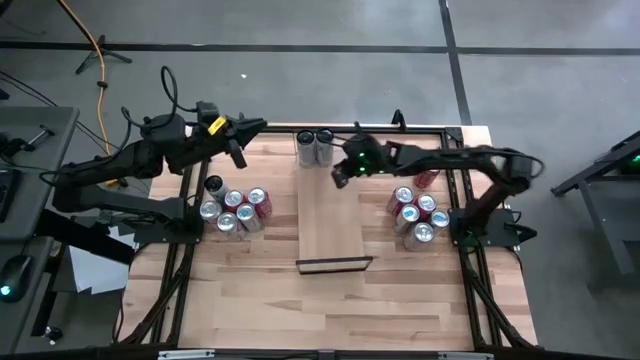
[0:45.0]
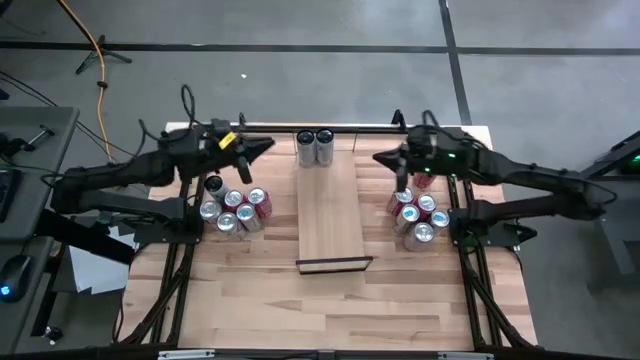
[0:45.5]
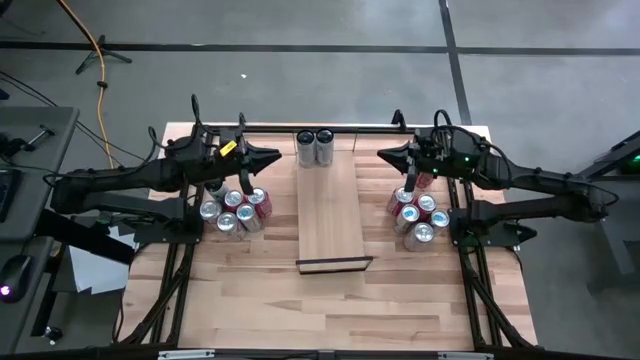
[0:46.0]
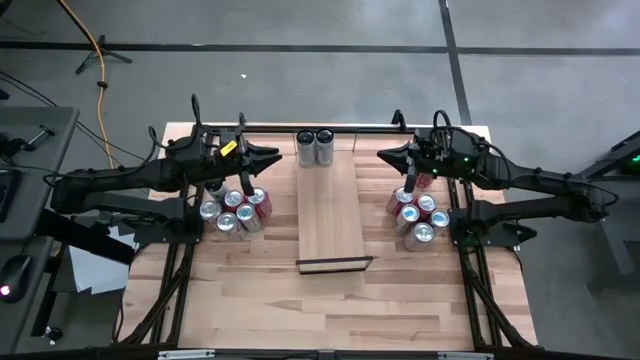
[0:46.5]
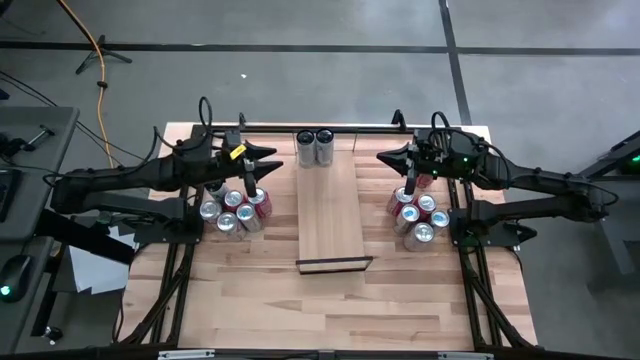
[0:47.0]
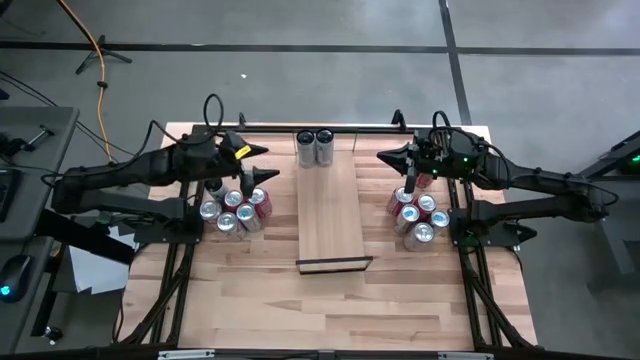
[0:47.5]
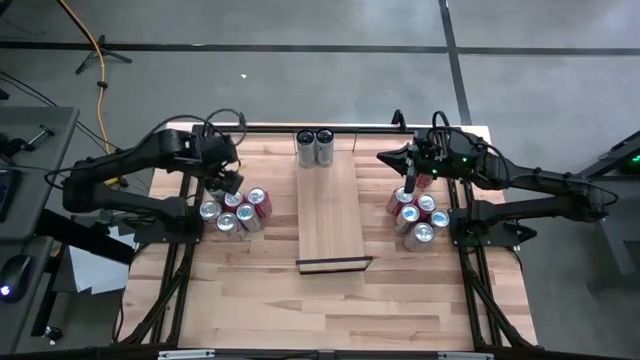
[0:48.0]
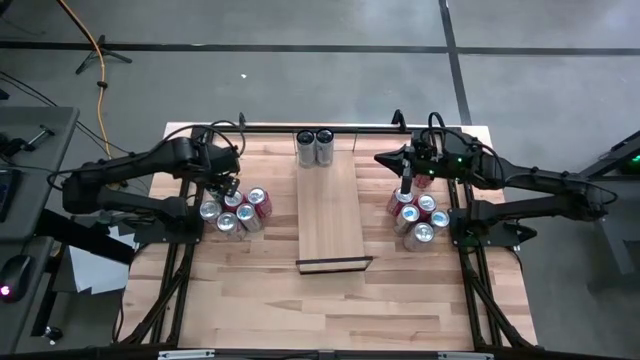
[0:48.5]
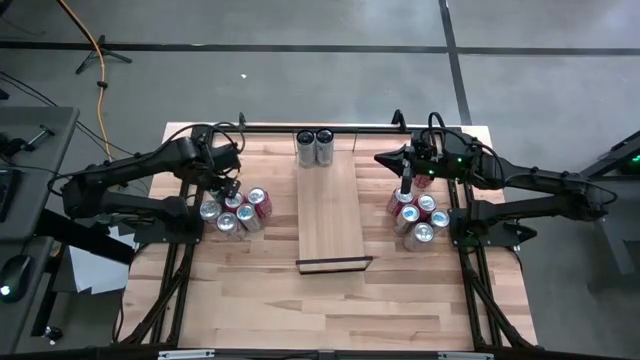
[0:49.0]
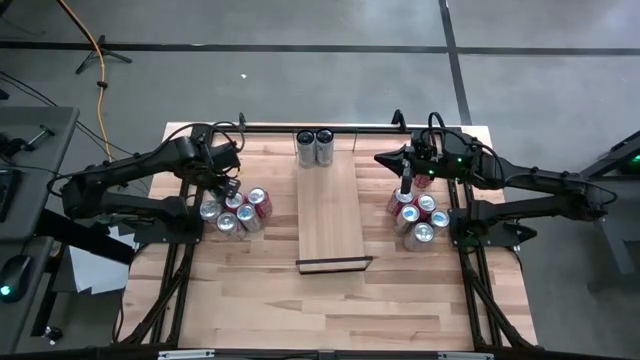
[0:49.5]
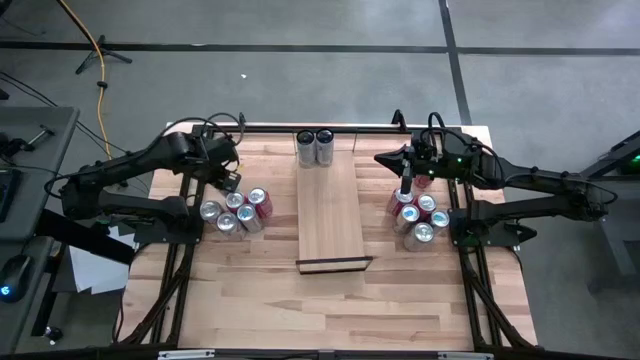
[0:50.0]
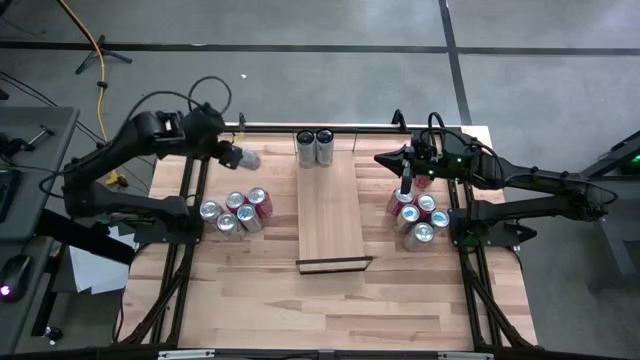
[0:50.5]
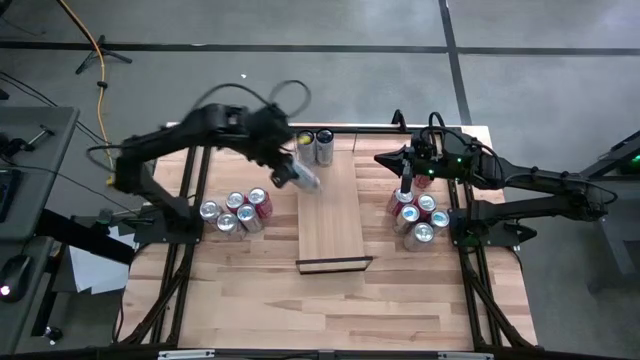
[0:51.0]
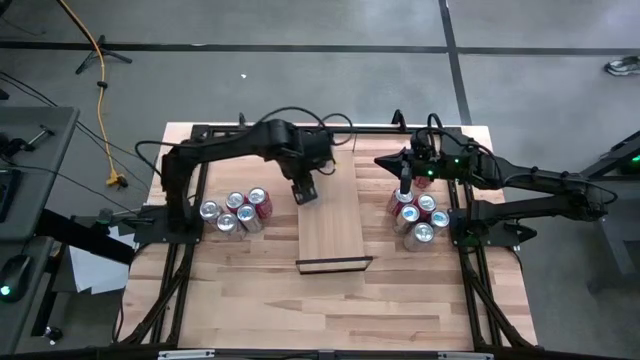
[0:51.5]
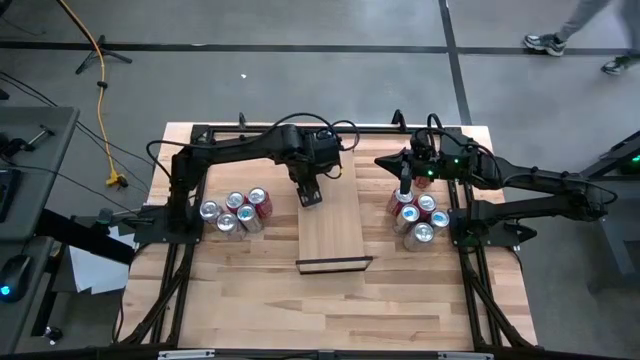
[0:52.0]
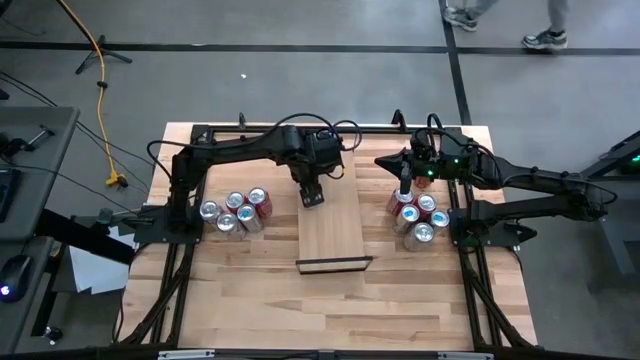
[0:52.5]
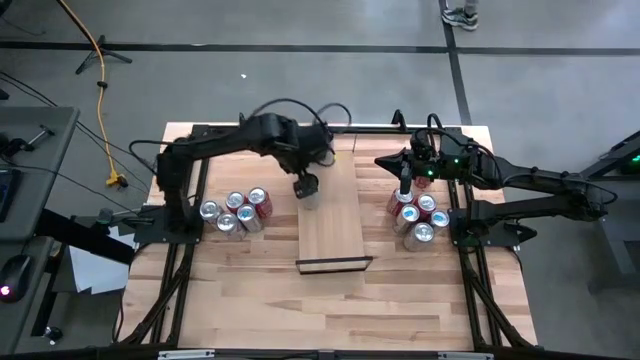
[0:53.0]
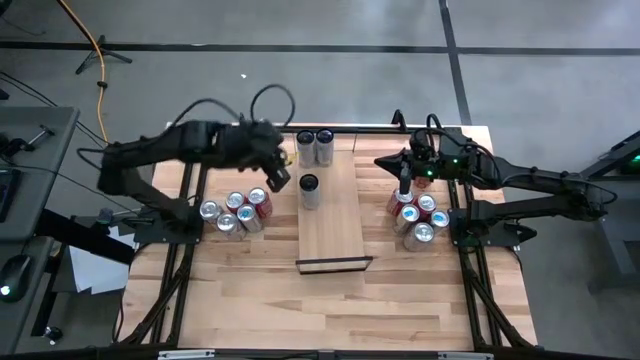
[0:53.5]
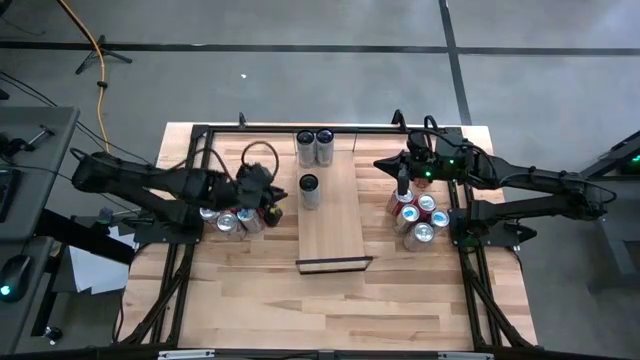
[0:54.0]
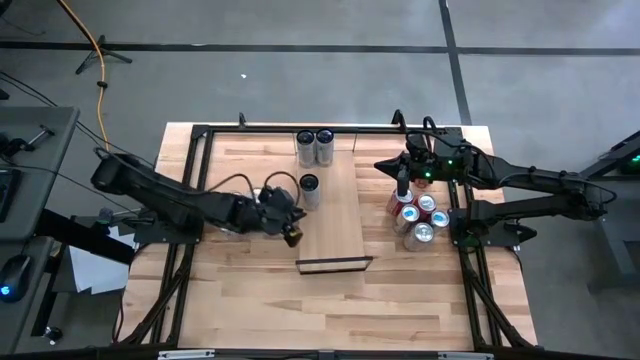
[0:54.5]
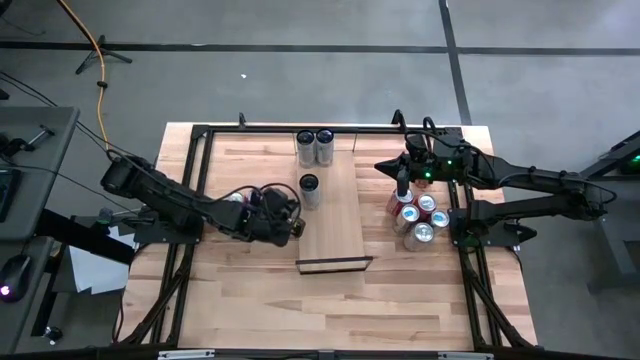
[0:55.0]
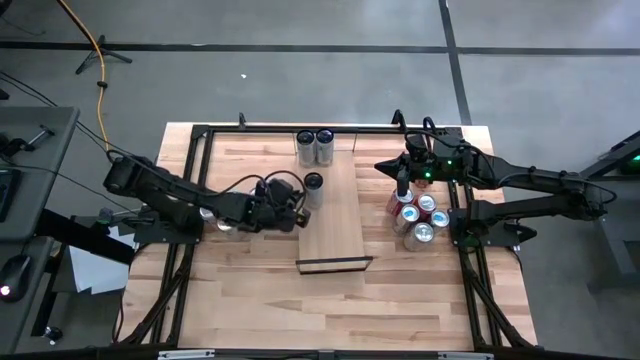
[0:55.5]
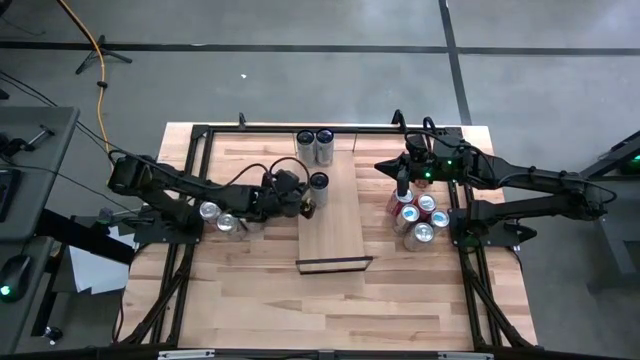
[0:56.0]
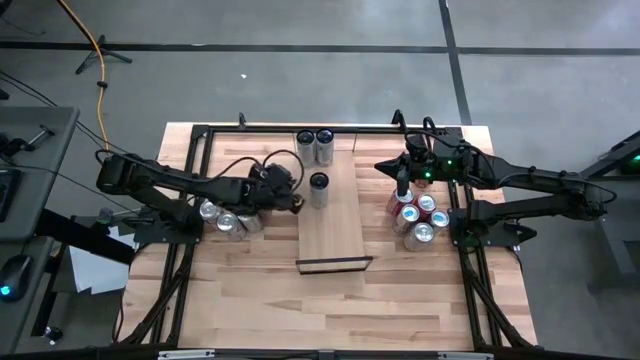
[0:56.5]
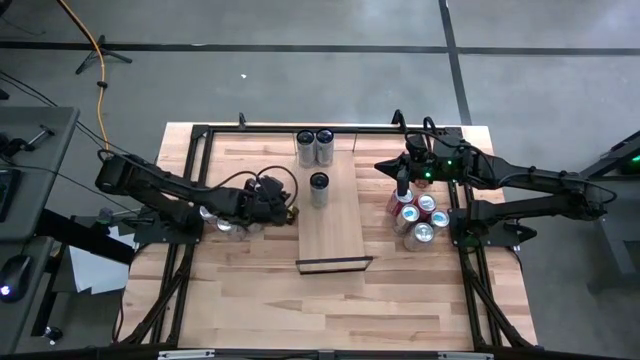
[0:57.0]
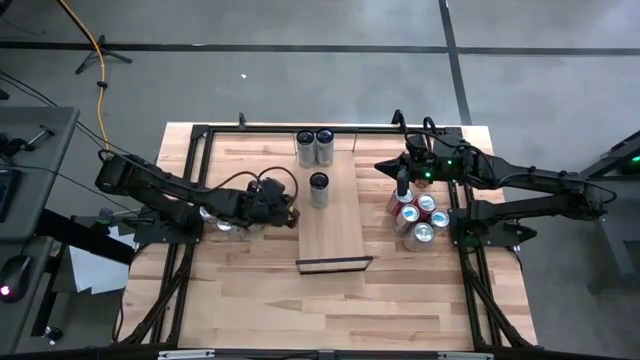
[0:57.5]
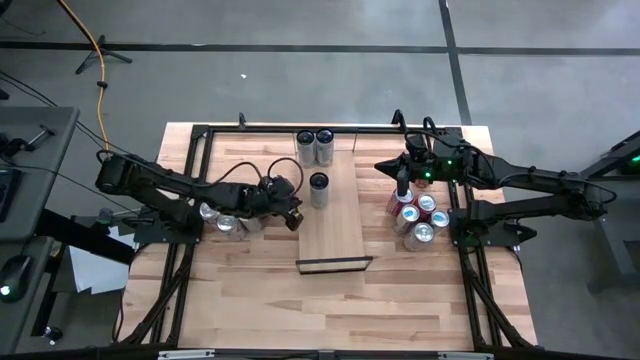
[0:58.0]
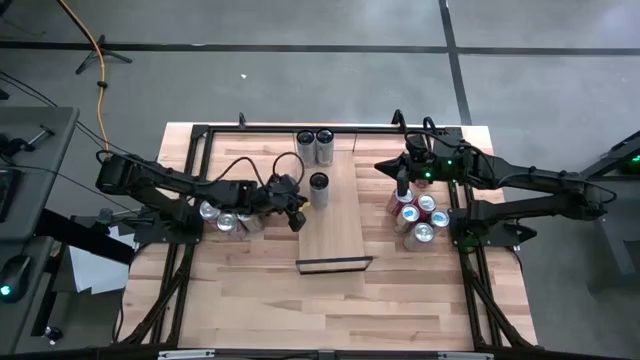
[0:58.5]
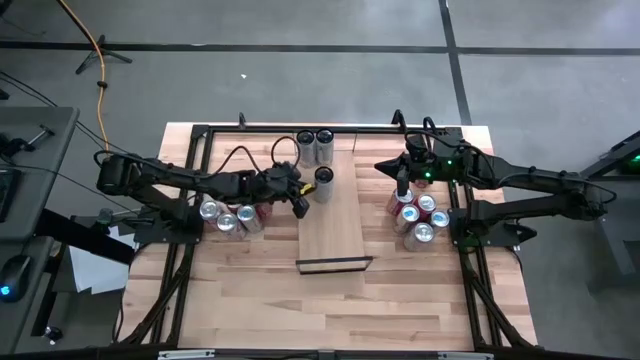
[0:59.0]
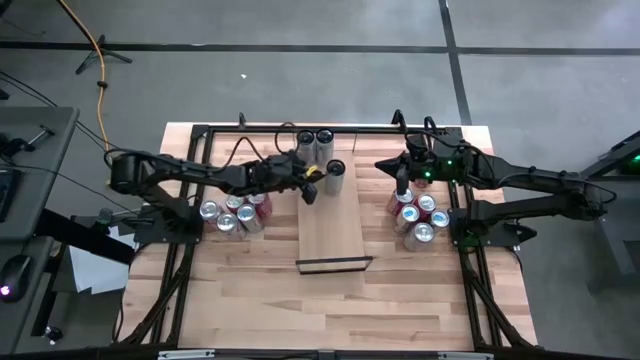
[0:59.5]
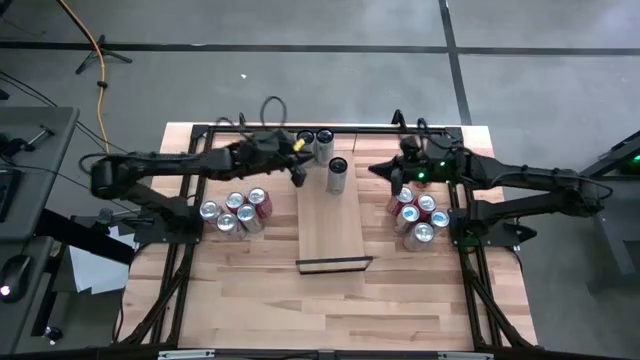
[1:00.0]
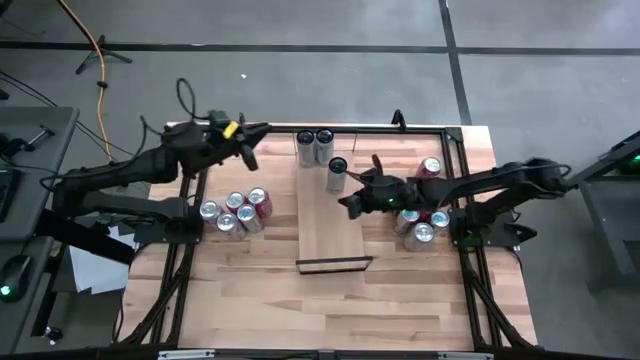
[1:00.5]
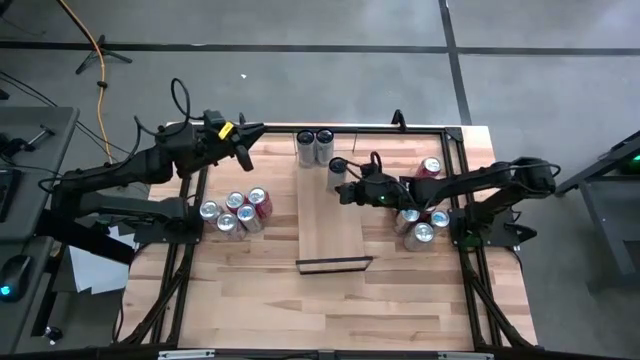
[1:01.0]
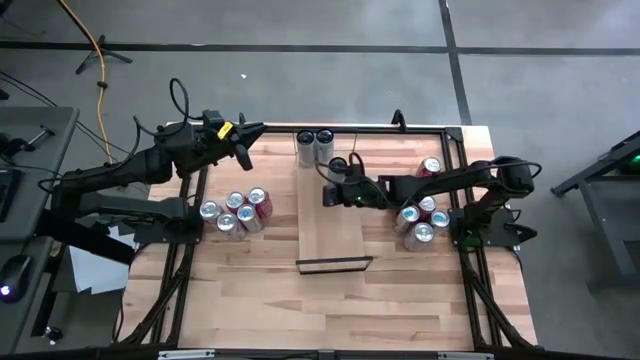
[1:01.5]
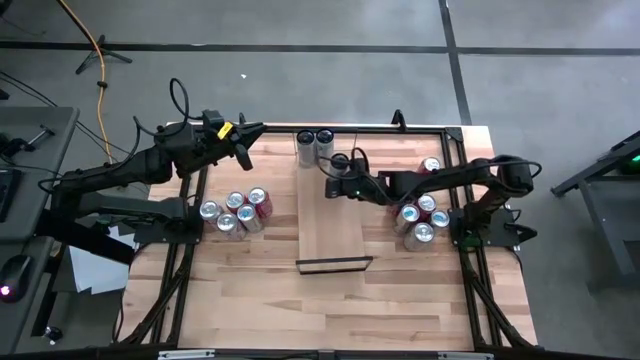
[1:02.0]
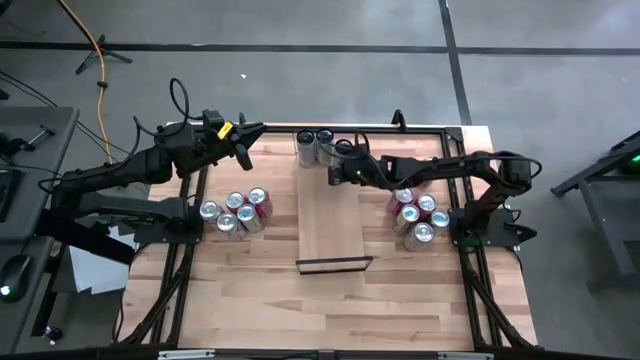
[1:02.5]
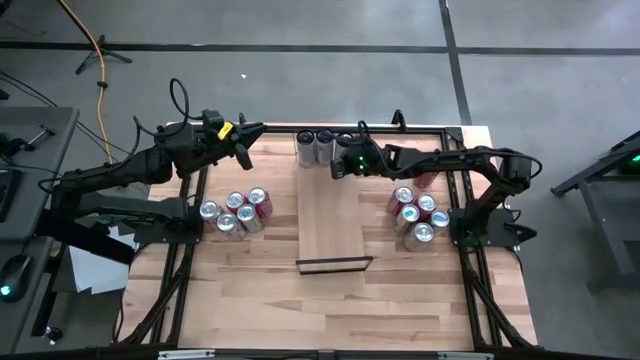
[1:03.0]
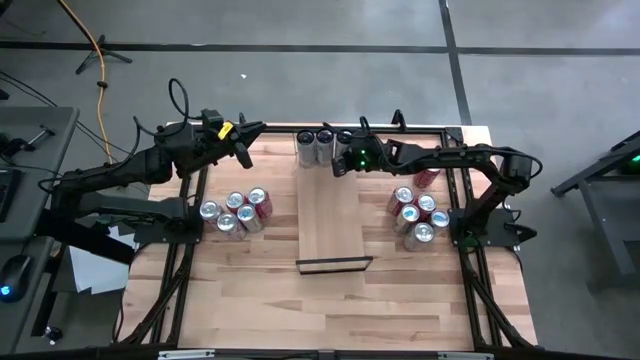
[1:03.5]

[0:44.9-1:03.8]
Task: Place canned beverage on shelf
Put the white/pink soda can on the shelf aligned with the other white/pink soda cans

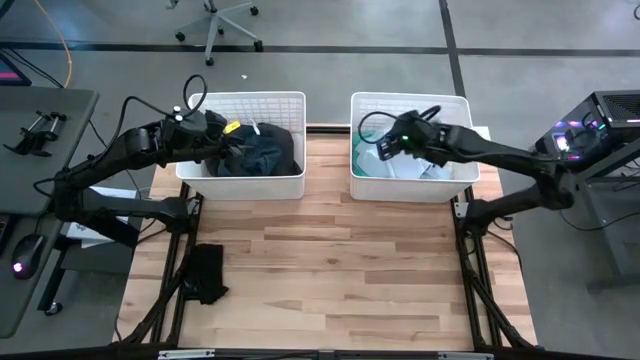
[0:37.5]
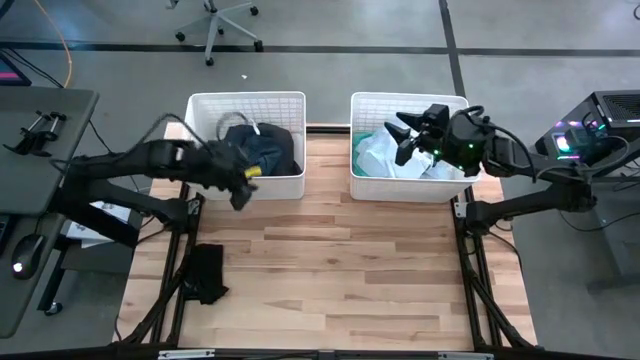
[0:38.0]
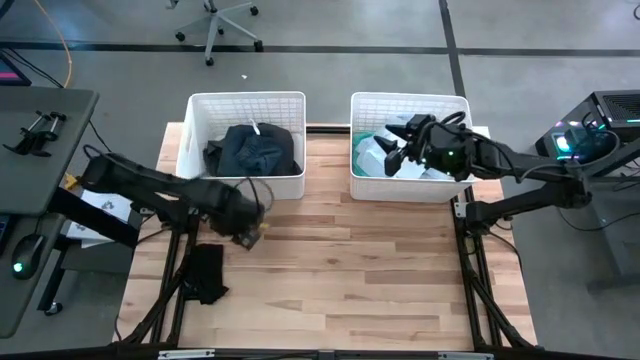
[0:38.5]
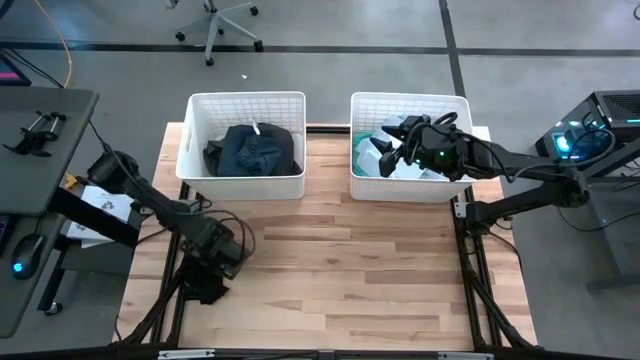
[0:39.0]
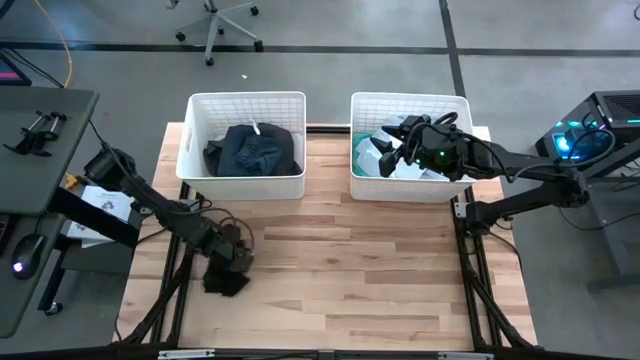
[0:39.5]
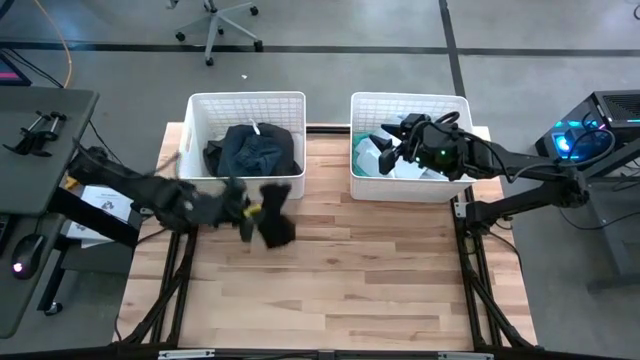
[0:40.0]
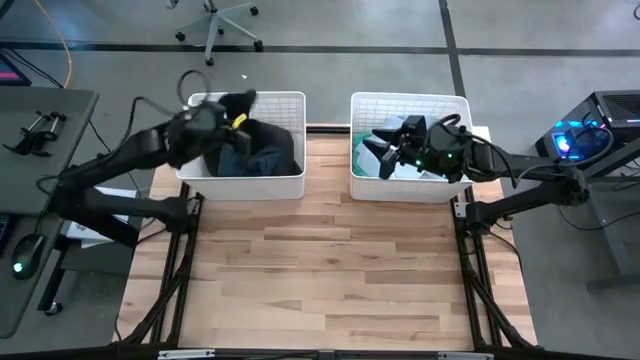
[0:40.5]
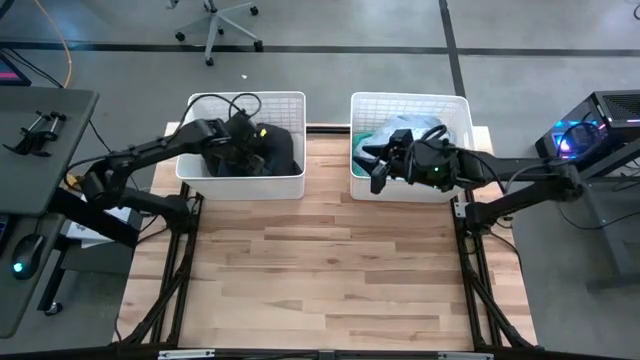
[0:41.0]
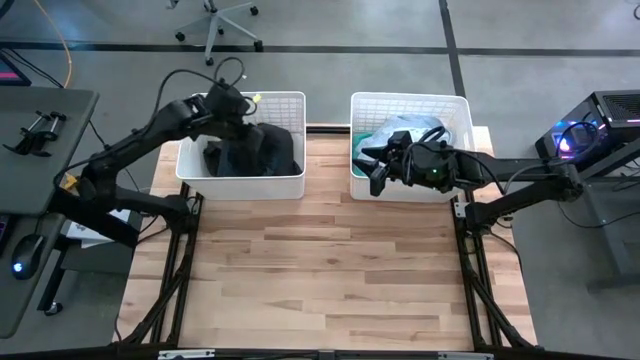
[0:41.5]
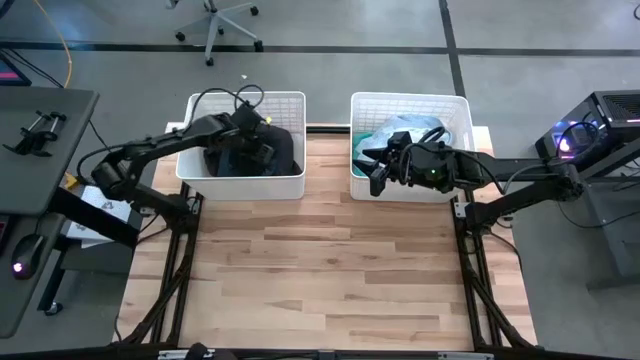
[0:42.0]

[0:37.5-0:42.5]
Task: Sort clothes
Put the black shorts into the left white bin
